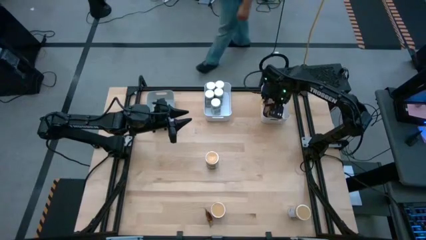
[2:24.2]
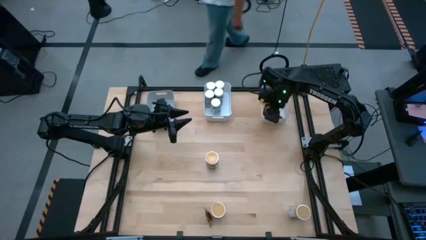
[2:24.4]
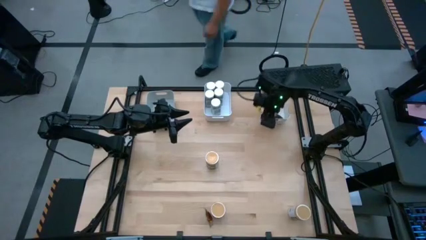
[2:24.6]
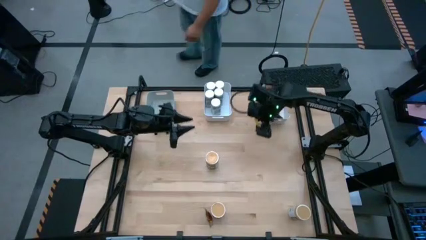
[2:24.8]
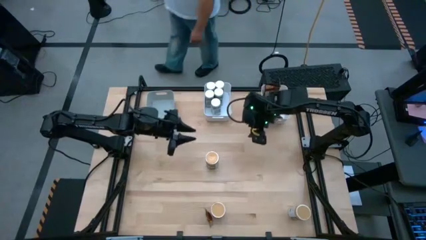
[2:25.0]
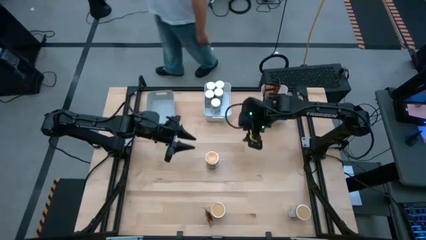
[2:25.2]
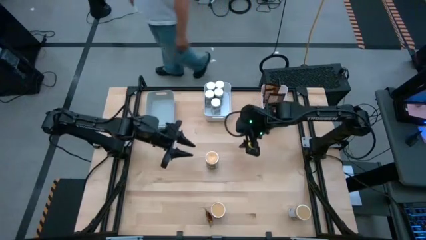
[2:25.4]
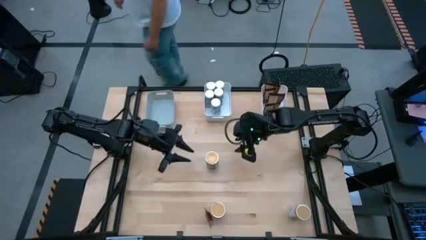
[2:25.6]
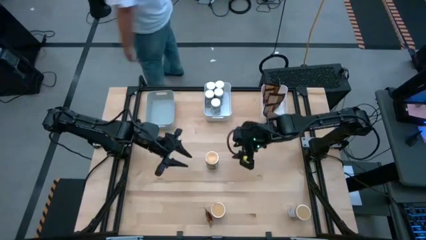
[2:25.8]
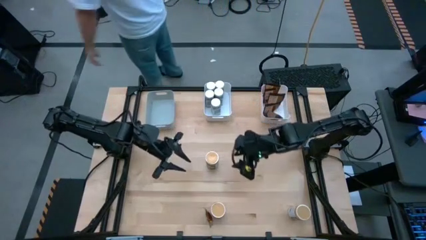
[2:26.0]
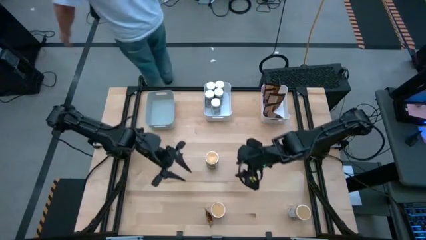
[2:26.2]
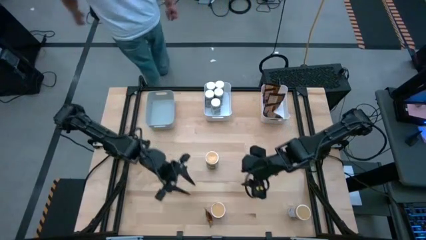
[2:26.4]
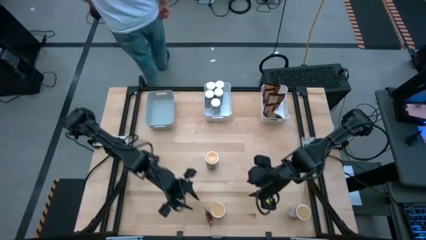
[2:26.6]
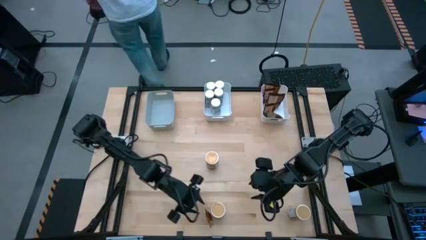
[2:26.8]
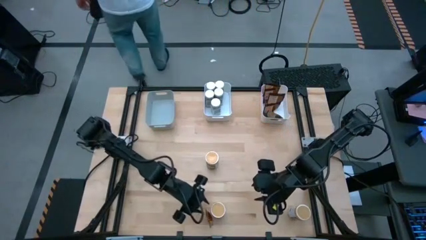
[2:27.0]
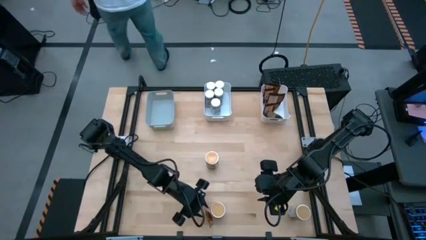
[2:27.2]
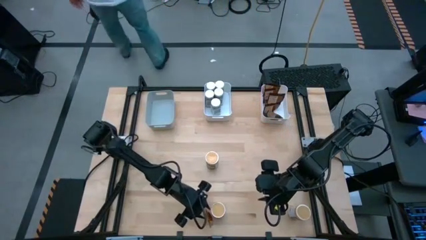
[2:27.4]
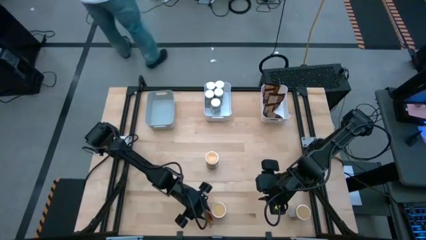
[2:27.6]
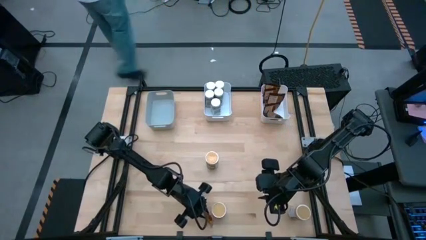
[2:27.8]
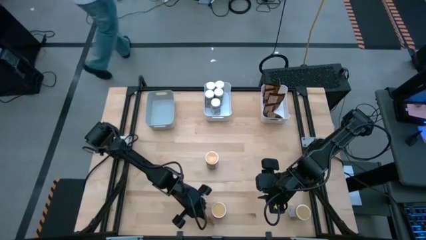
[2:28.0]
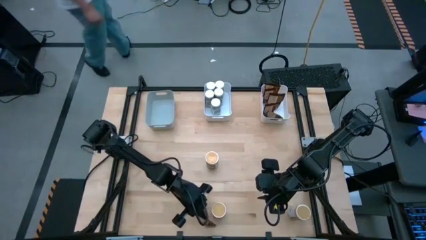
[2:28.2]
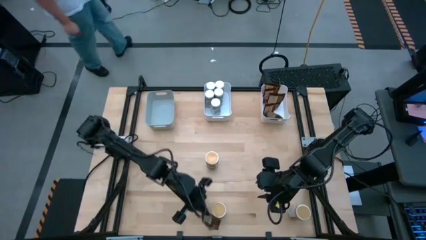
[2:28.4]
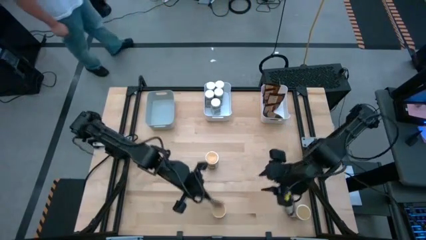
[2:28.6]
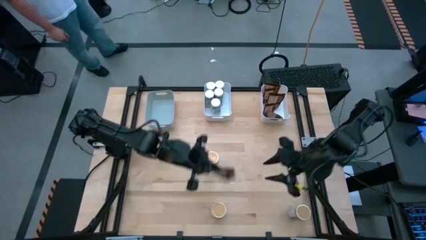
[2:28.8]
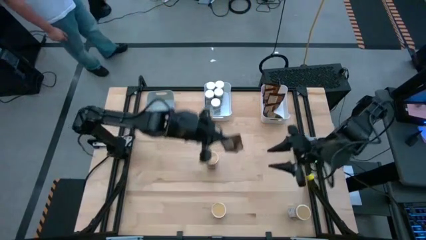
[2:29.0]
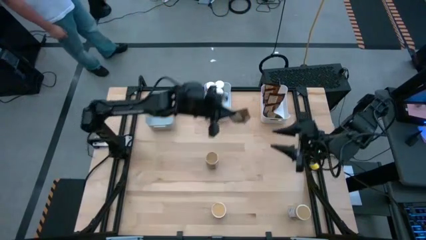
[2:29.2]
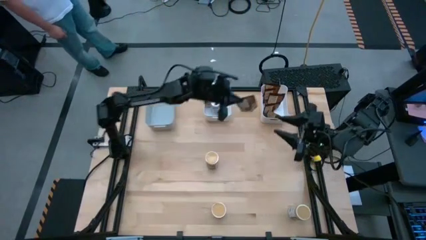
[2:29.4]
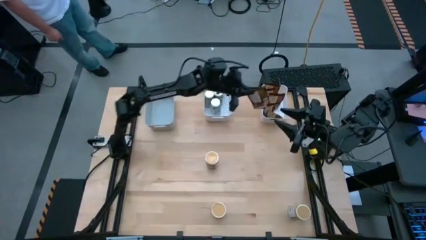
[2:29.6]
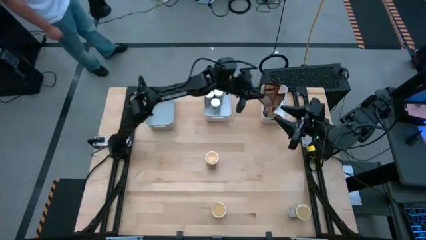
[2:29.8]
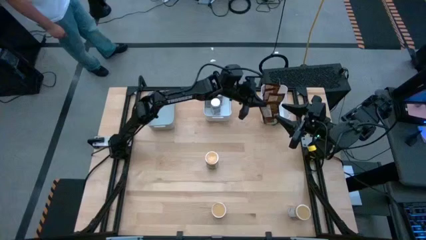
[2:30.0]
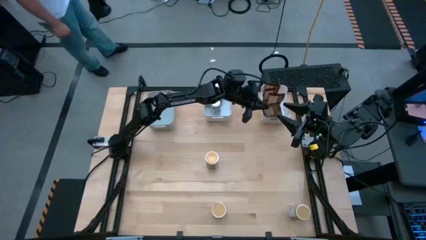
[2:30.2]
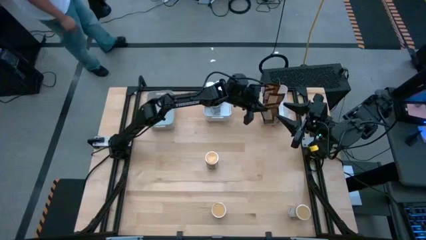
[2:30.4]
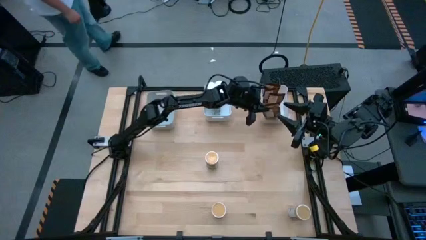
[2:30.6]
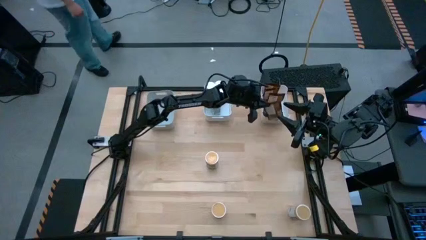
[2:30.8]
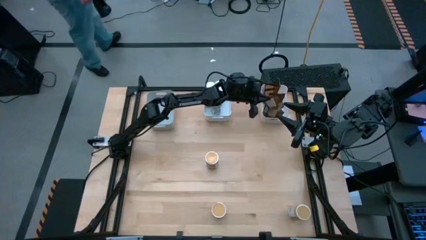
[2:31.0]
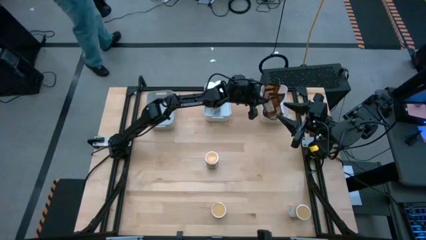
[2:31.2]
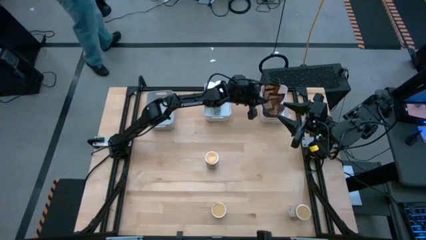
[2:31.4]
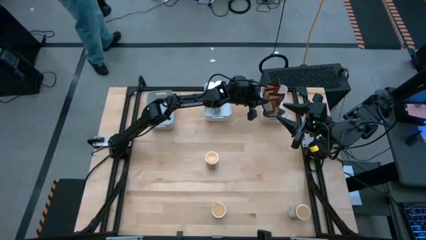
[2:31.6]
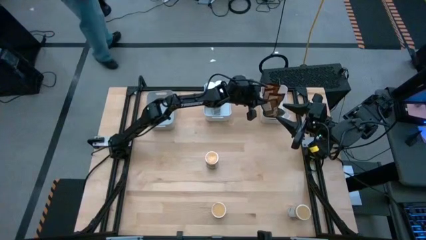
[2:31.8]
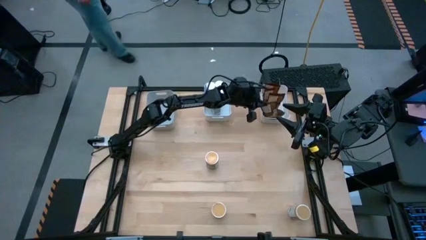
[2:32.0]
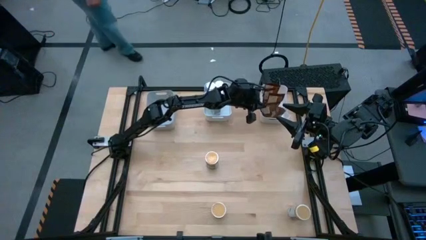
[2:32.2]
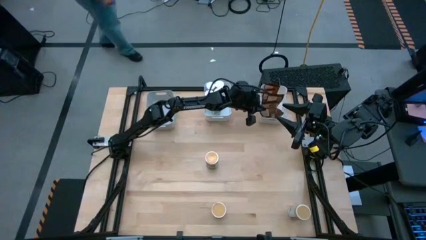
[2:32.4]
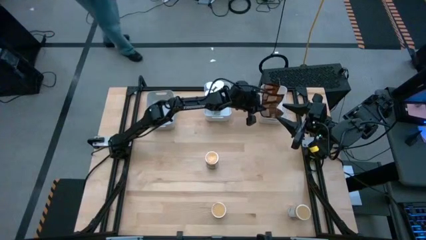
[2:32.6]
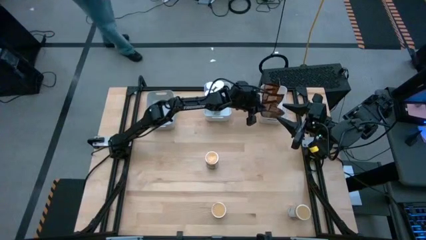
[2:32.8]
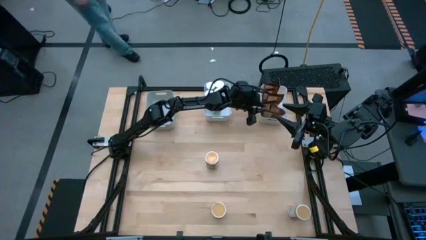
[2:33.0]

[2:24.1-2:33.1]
Task: Sort spices by type
Put the orange seasoning bag into the right white bin

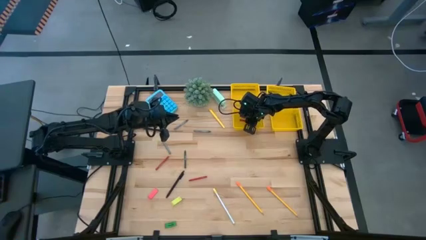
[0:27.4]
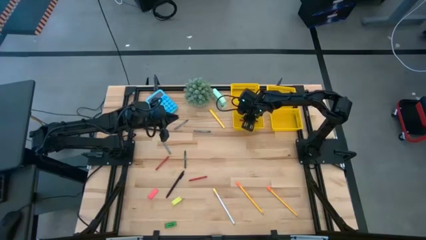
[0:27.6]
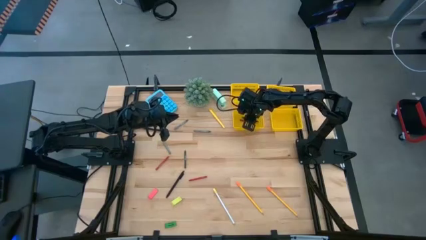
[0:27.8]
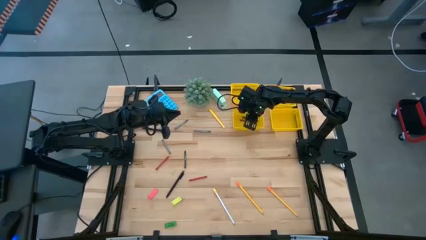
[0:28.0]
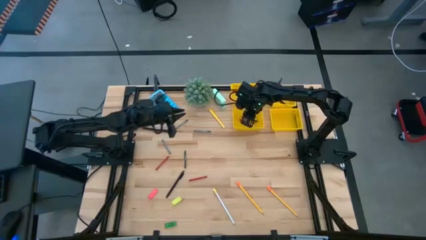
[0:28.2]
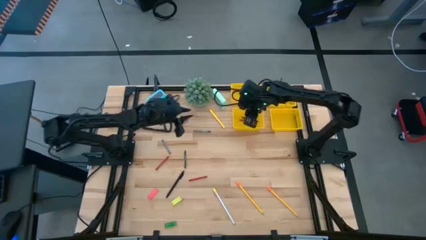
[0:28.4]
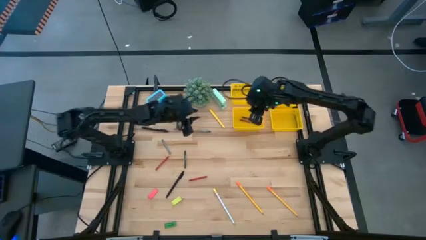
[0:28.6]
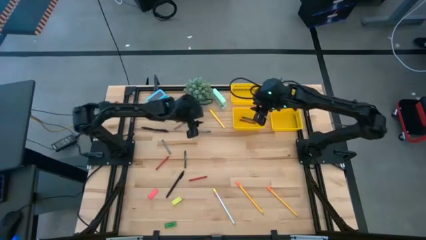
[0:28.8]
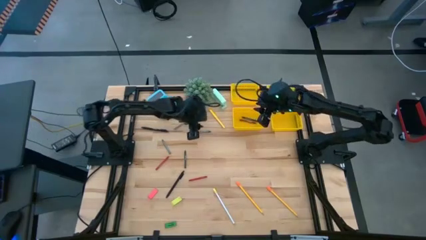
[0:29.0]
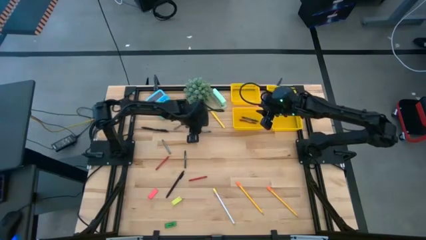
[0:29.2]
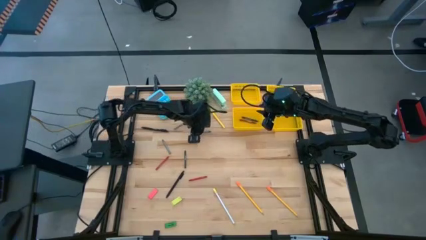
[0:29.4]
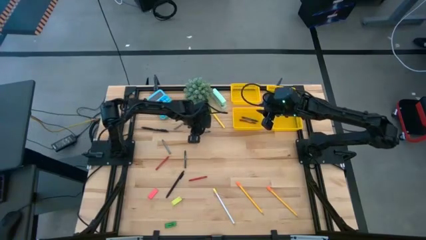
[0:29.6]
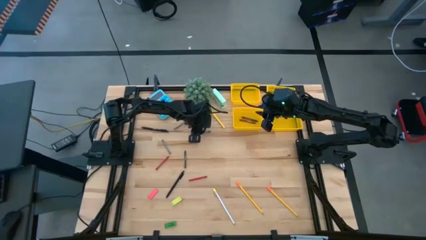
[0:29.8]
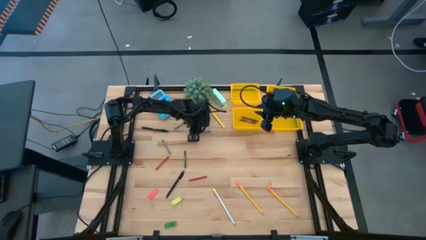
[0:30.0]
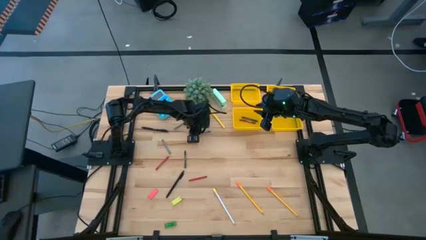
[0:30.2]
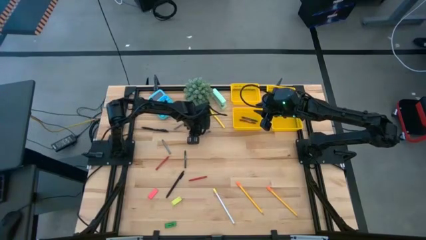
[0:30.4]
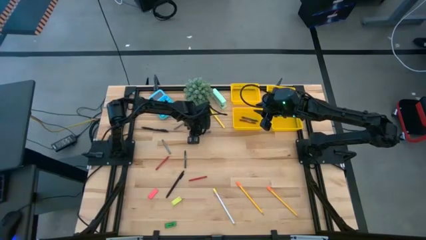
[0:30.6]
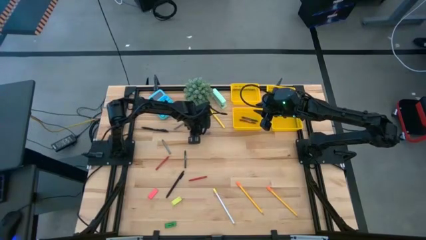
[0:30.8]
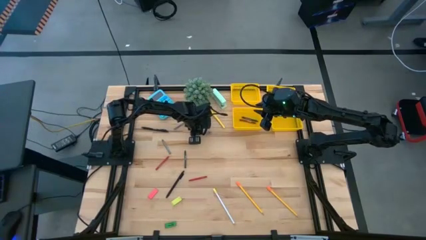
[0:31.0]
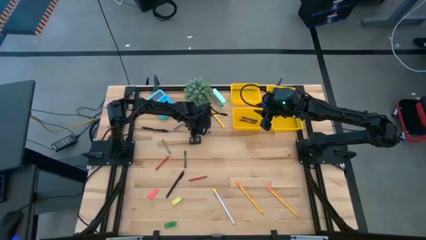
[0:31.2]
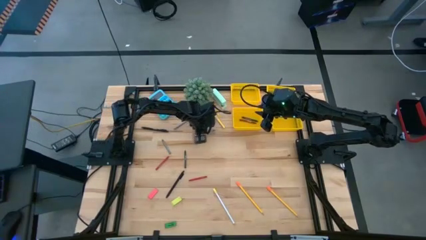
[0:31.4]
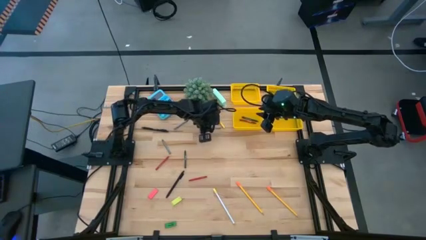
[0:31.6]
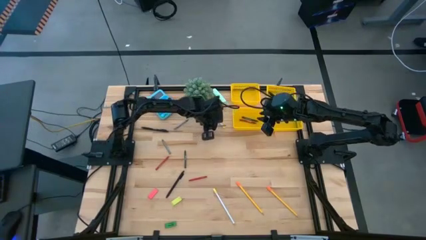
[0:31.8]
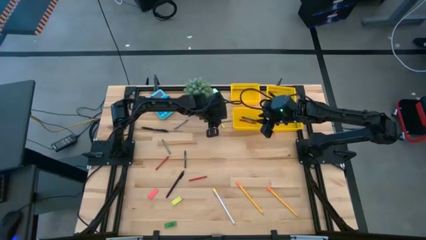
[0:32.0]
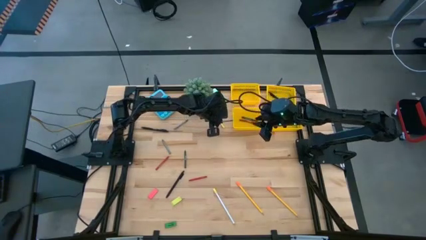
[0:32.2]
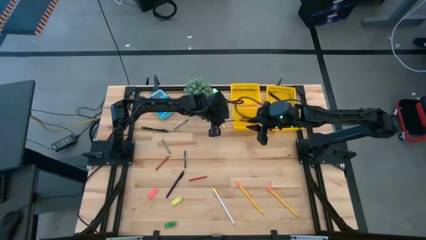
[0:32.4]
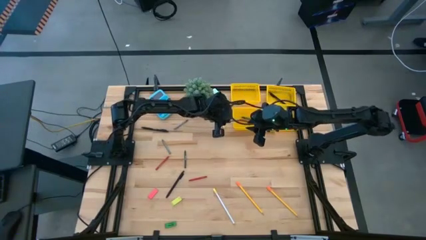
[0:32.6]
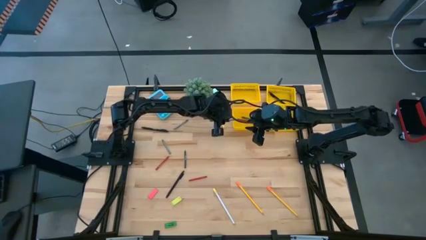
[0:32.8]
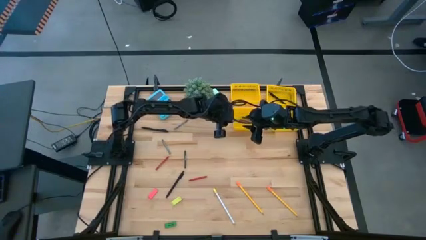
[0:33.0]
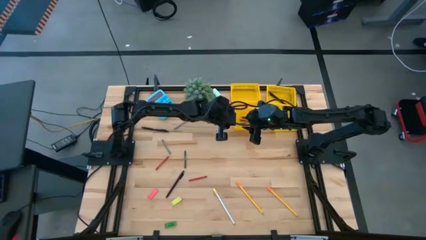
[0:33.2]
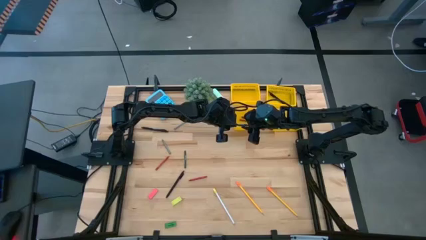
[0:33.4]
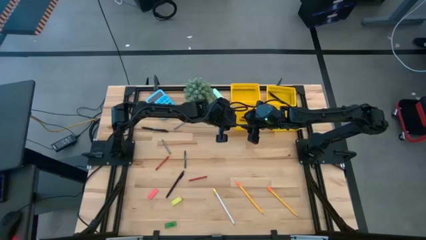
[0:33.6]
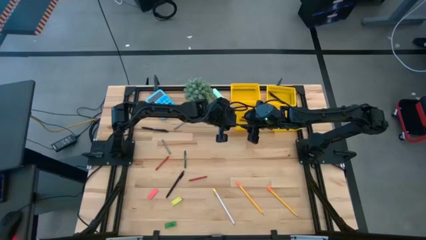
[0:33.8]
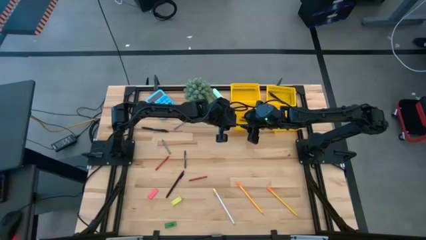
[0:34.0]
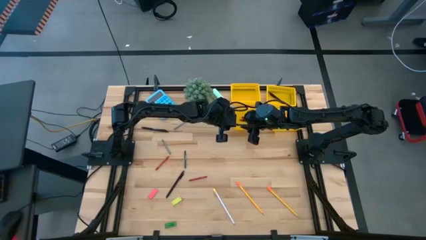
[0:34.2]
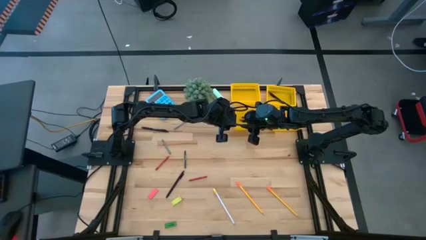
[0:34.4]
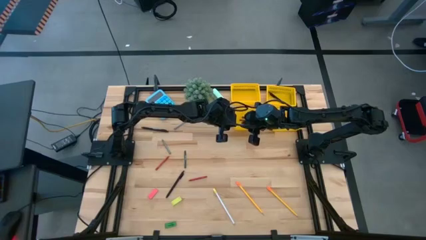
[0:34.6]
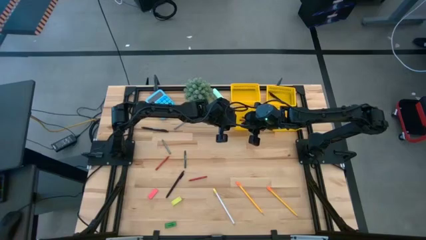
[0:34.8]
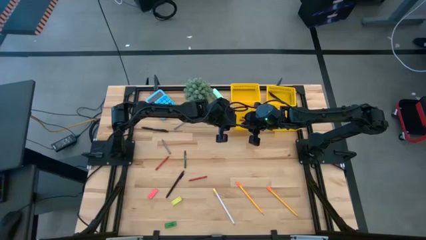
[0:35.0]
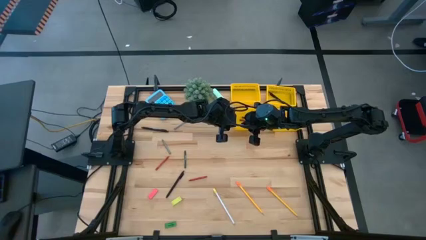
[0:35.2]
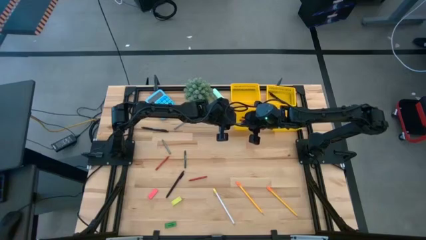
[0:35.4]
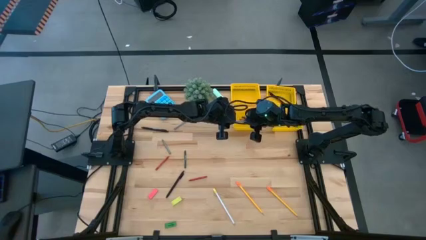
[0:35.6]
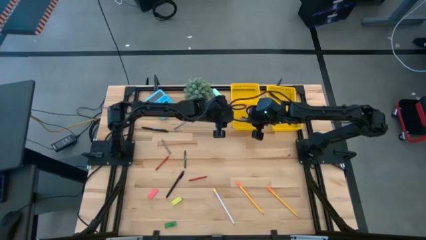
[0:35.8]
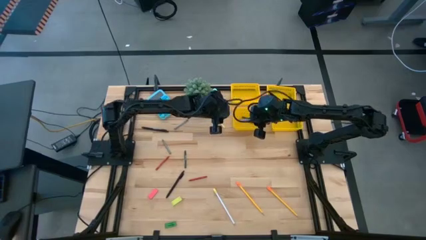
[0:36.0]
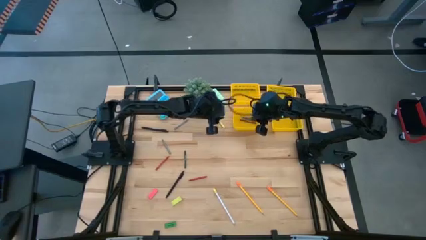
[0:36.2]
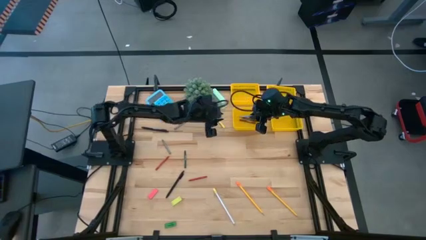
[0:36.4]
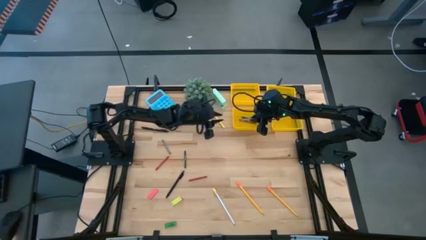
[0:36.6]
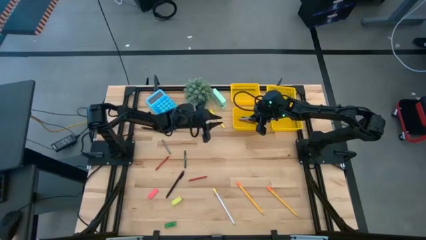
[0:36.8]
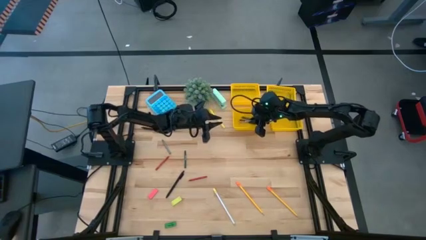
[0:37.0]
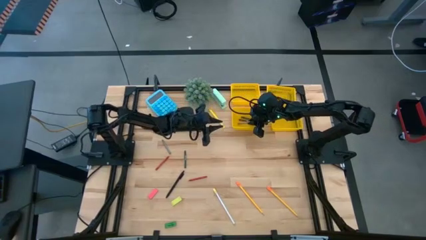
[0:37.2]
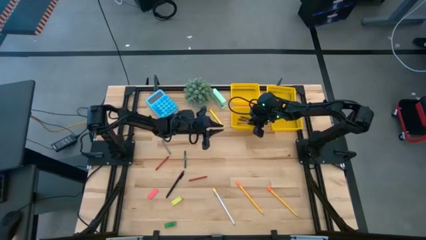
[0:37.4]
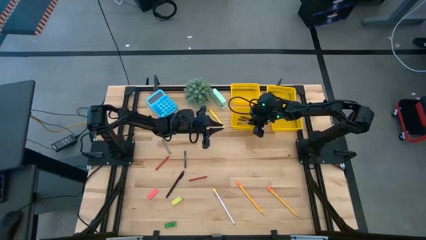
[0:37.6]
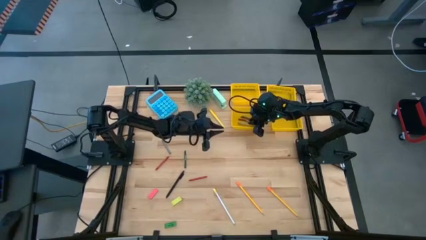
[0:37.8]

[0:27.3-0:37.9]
Task: Sort crayons/erasers/pens/pencils in bins
Put the middle gray crayon into the bottom left yellow bin
